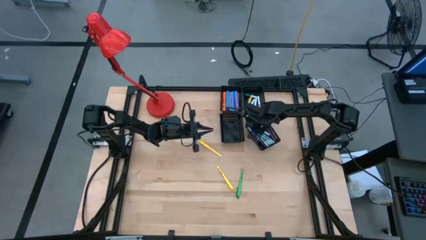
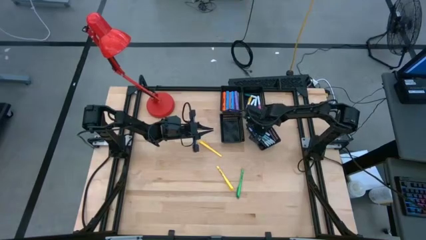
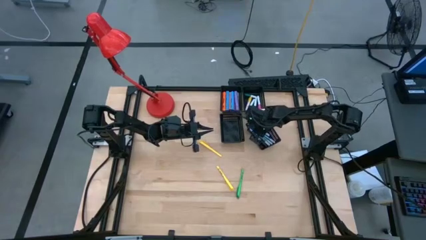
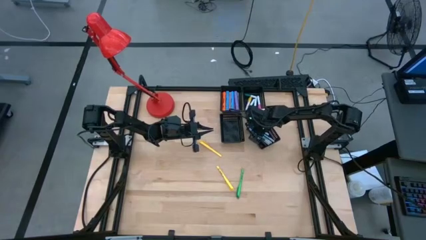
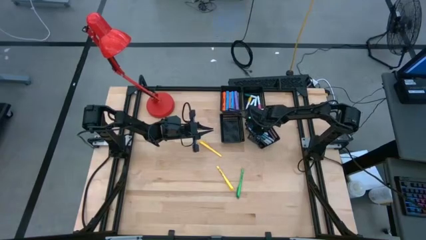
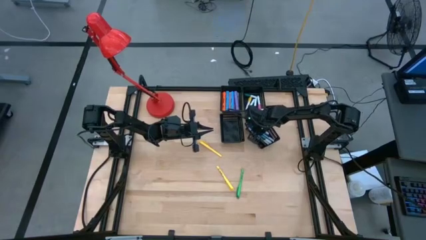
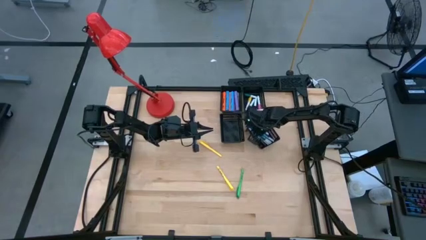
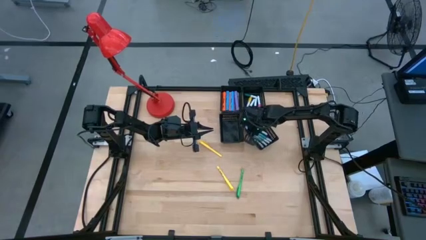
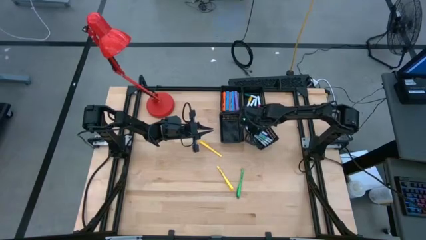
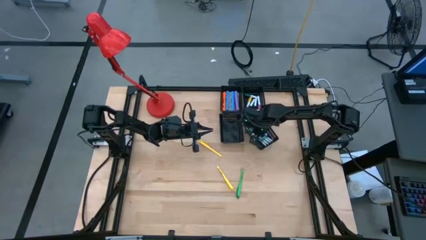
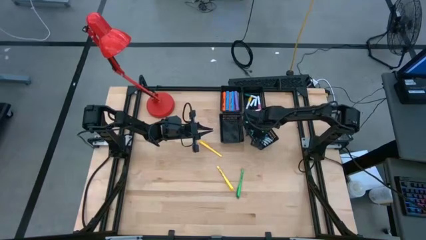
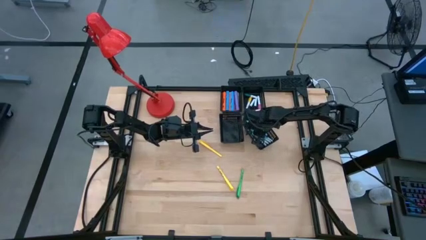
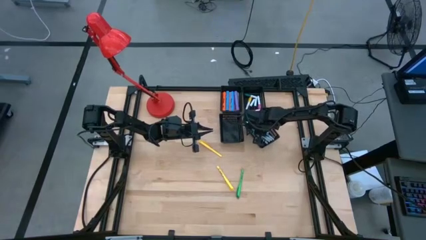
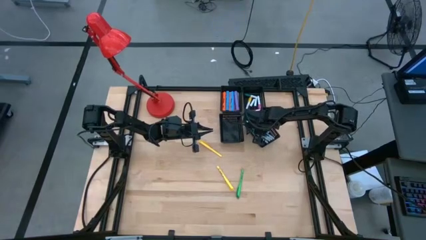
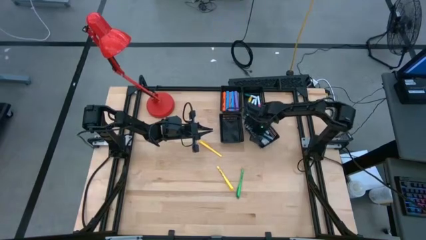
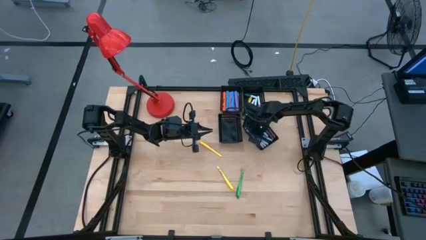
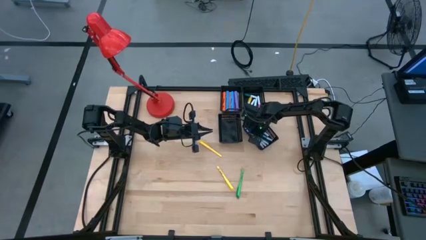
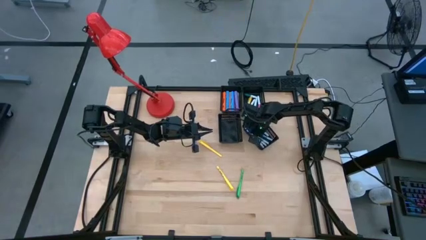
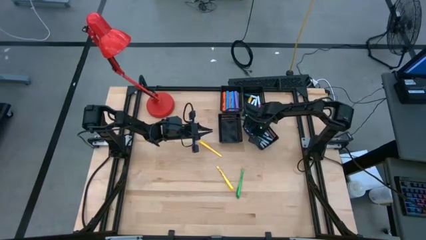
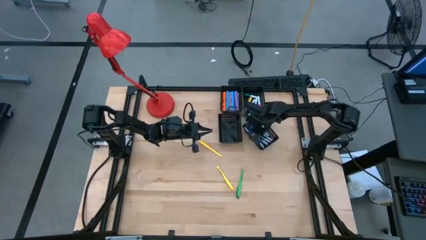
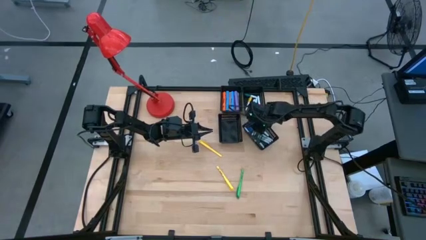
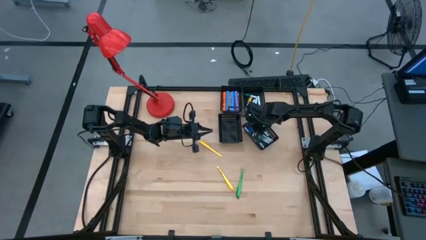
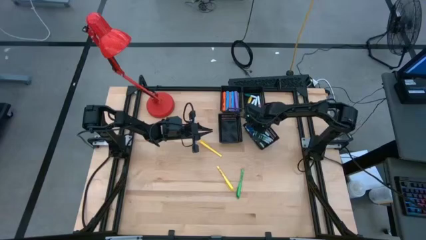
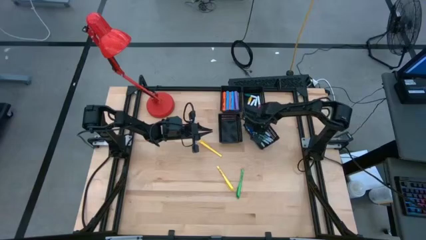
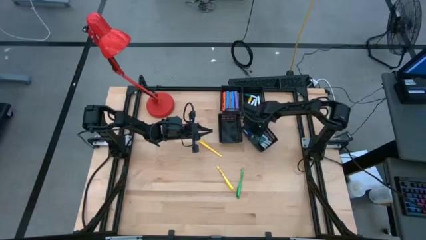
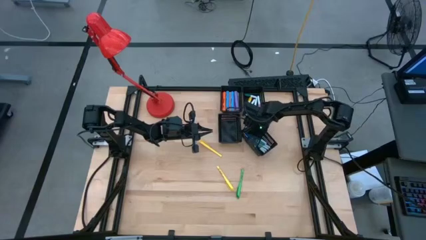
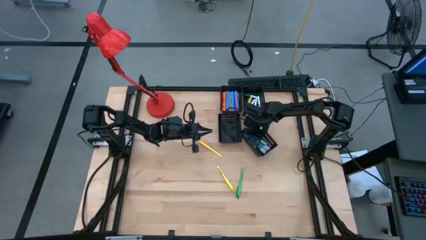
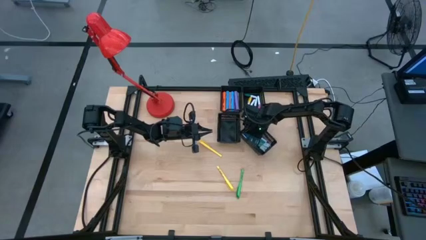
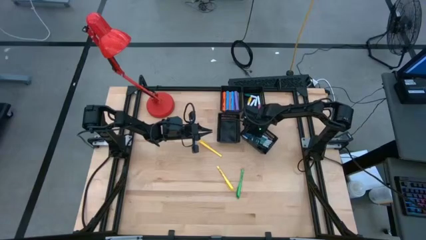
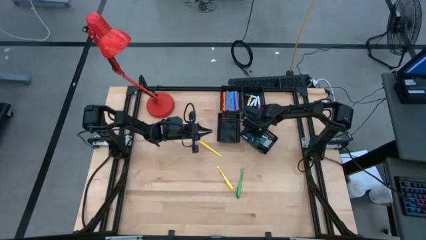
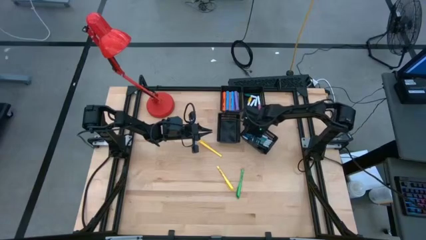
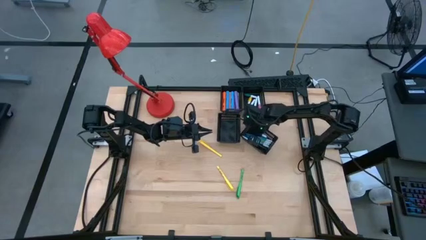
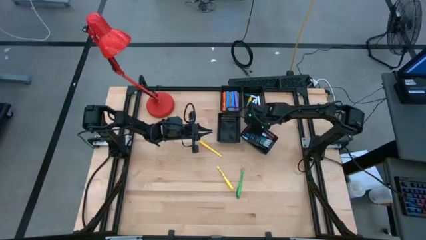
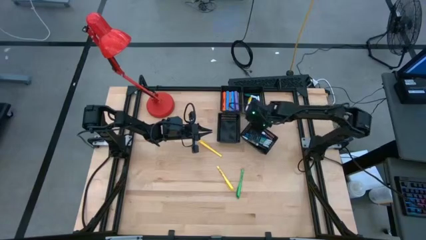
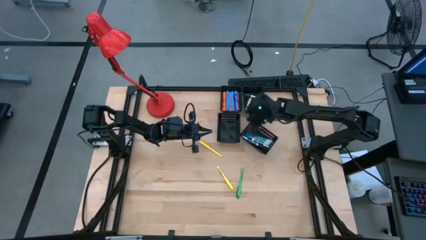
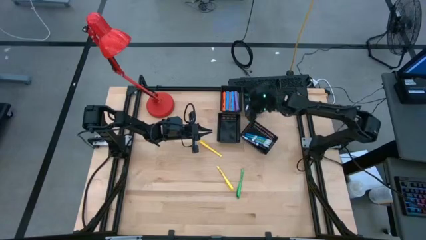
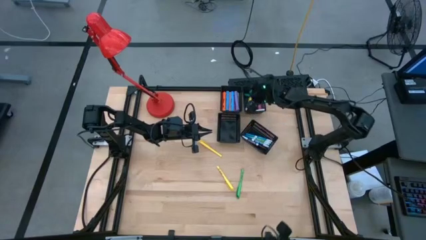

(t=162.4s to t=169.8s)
Task: Pick & Place Markers
Put the green highlighter pen into the top right black bin

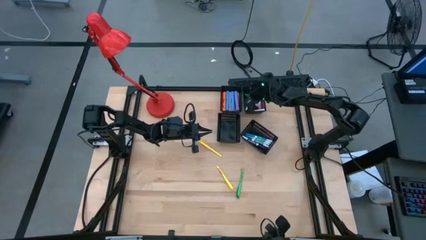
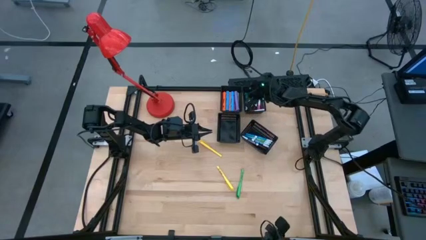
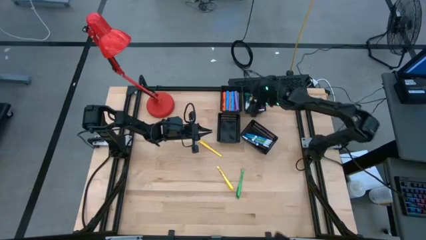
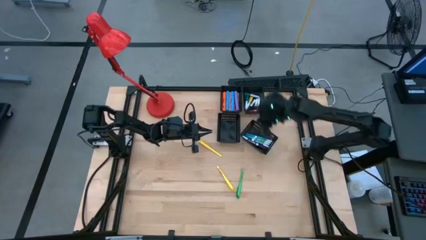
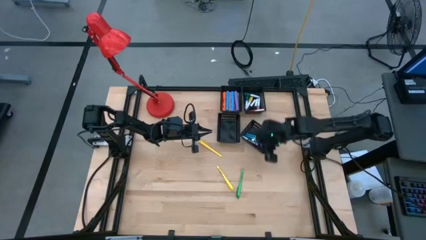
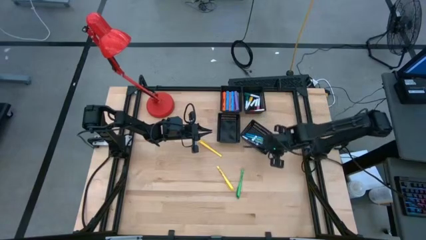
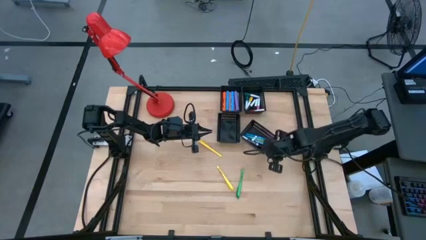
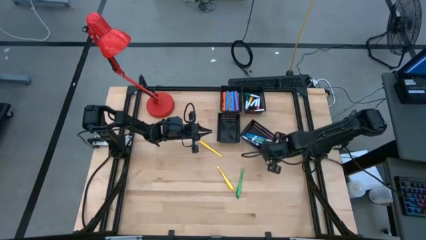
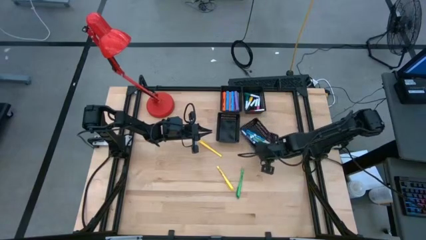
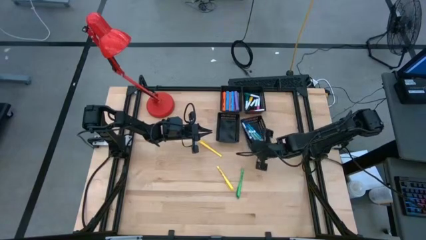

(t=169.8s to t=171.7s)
Adjust the bottom right bin

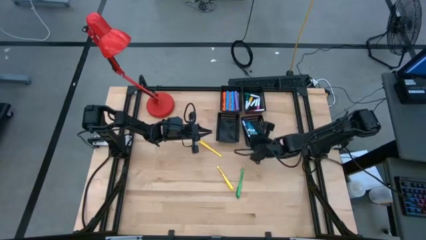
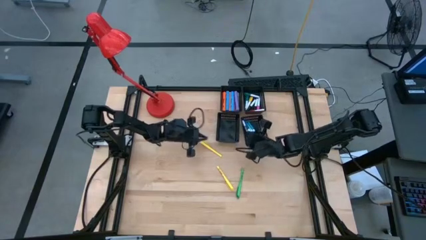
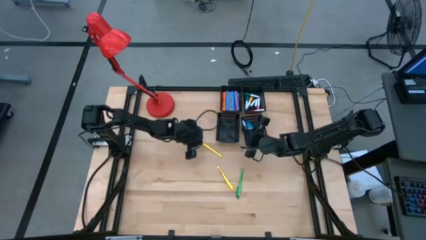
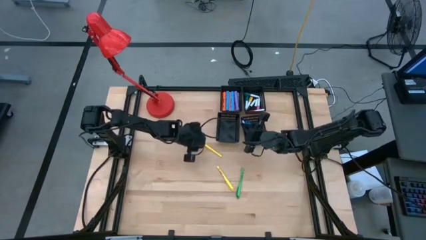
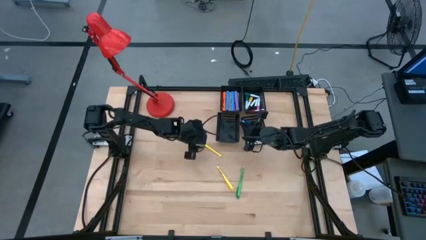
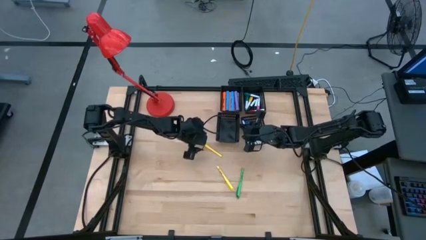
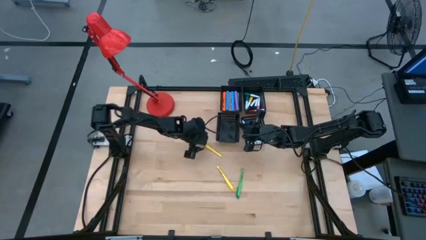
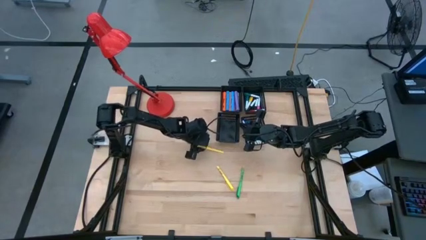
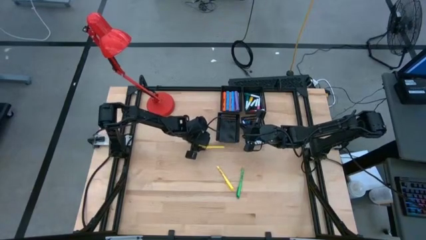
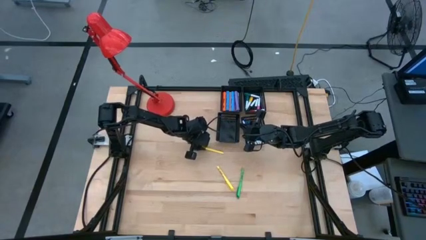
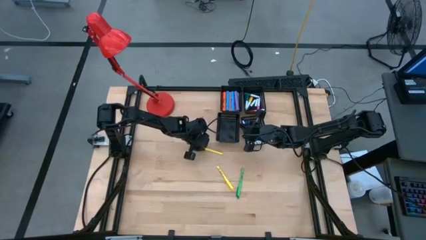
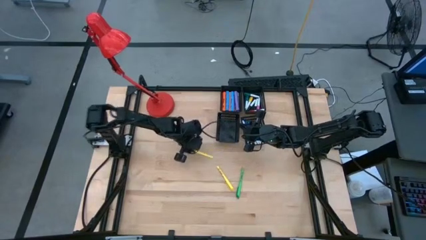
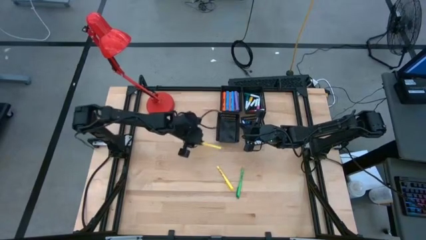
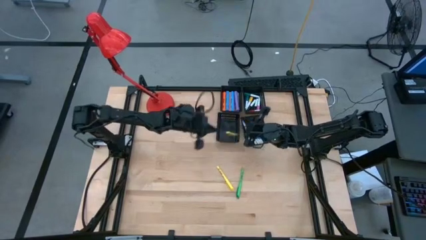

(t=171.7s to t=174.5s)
Put the yellow pen into the bottom left black bin

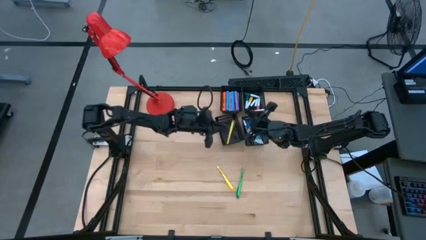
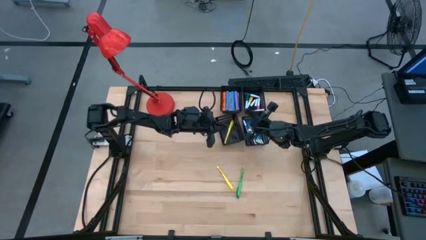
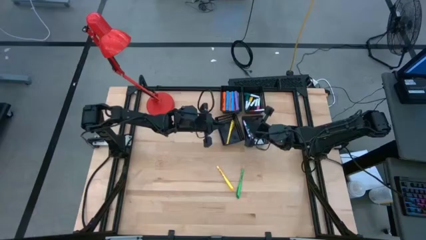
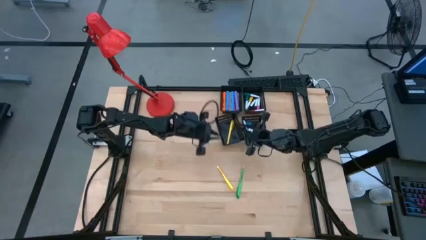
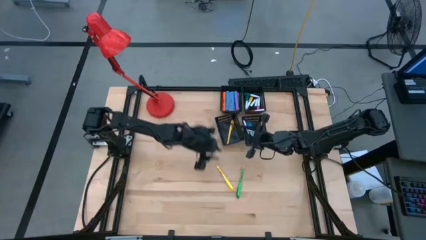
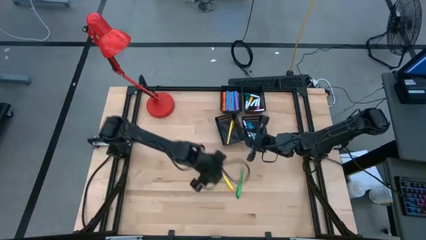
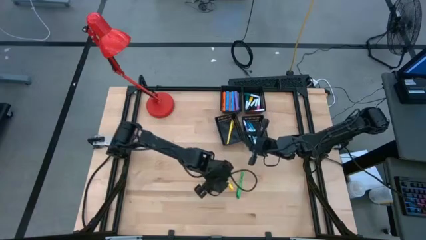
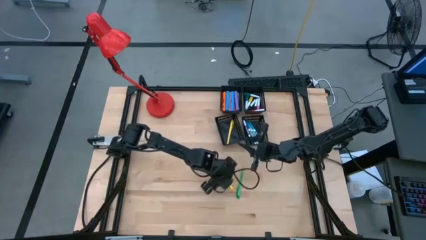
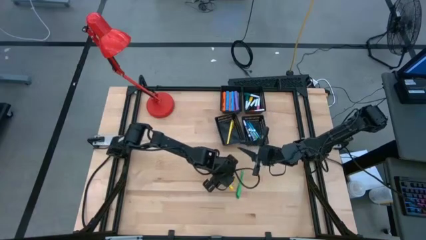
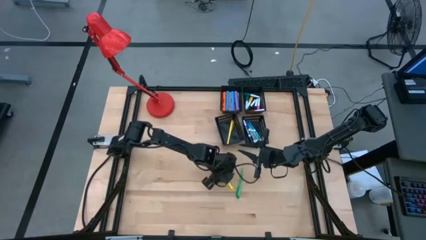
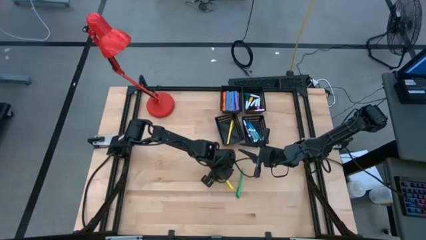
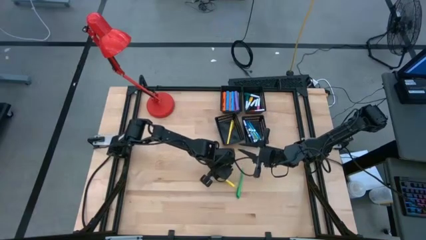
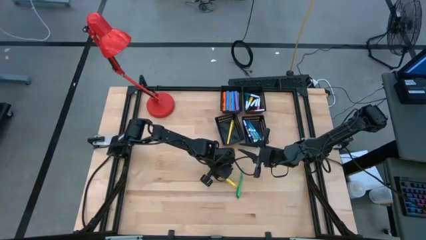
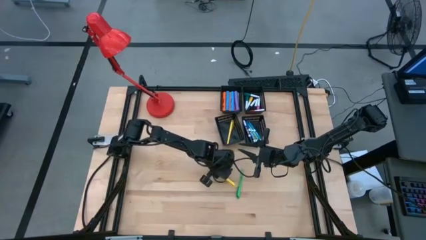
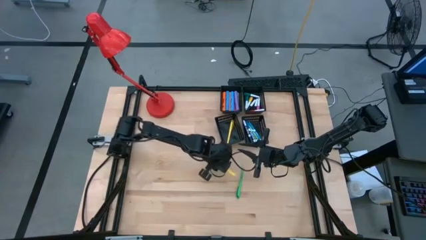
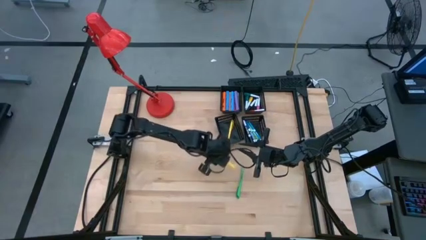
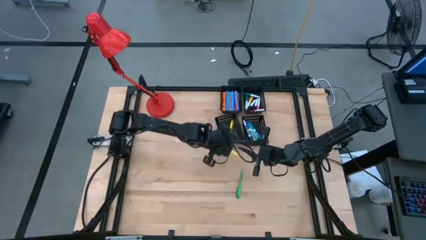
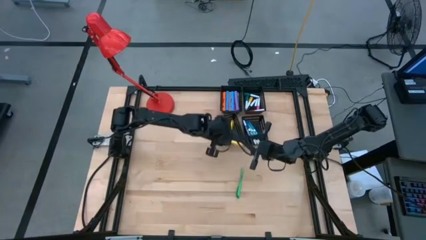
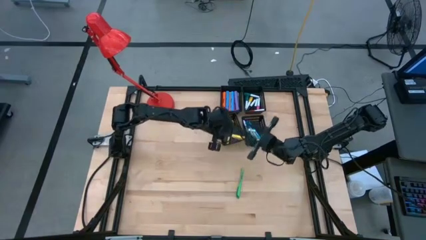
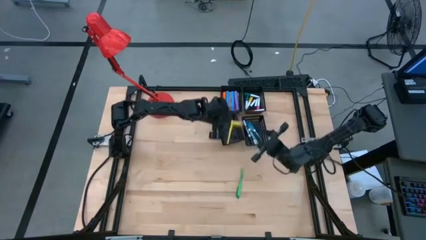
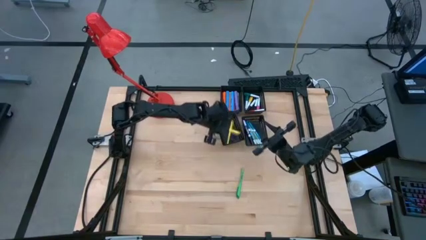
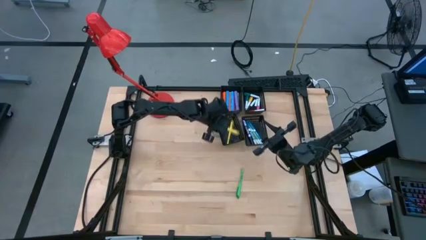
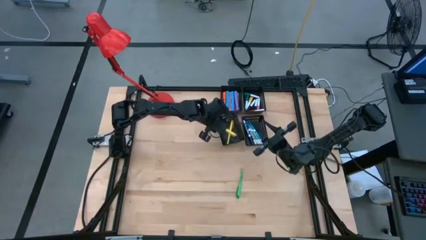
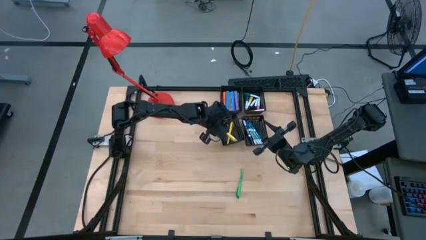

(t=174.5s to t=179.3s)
Put the yellow pen into the bottom left black bin

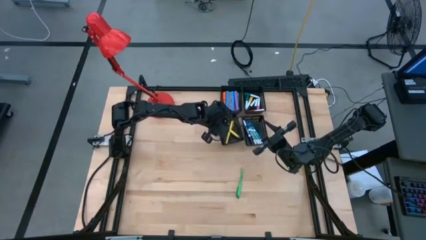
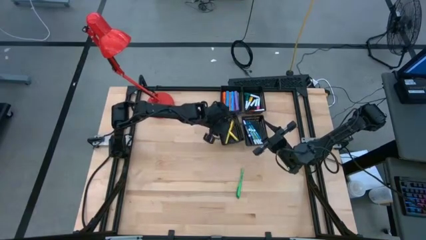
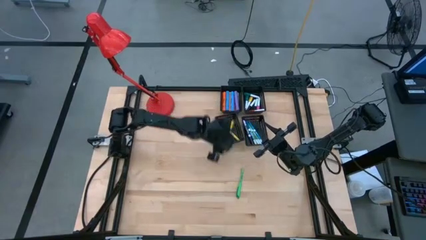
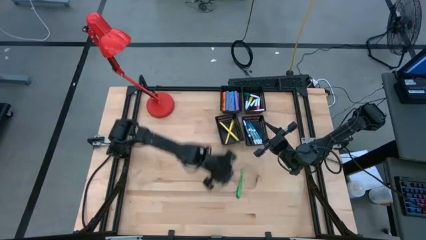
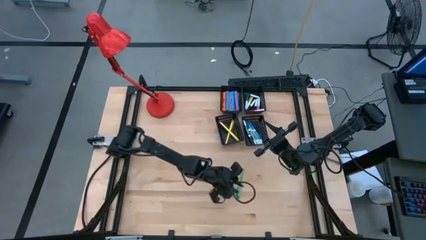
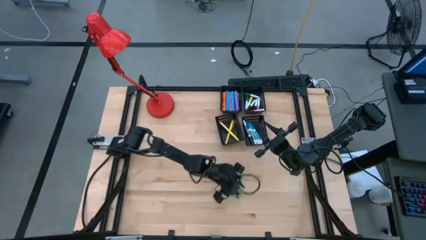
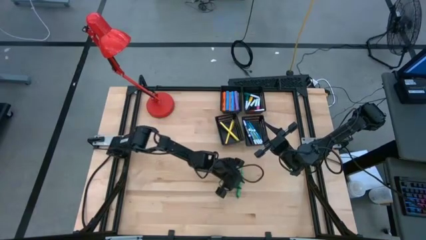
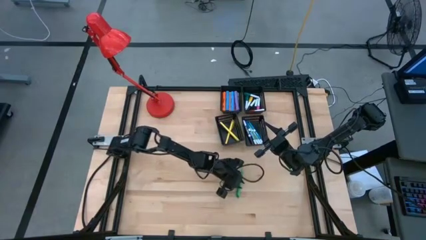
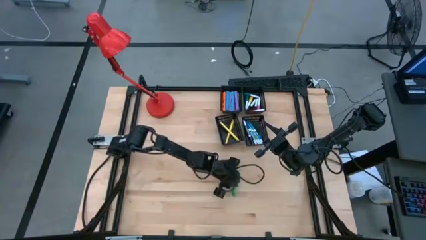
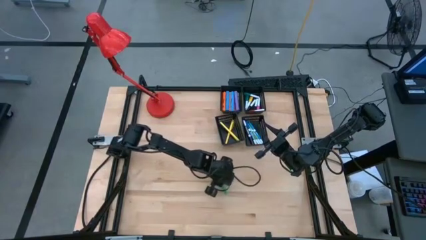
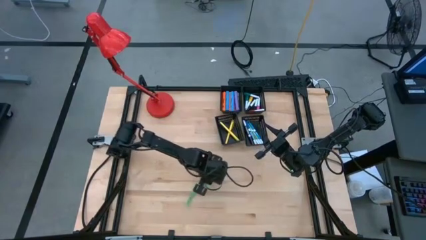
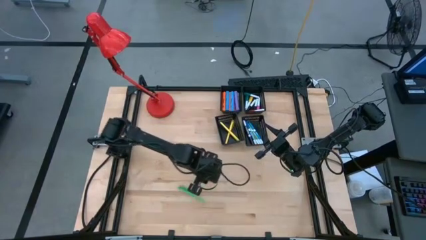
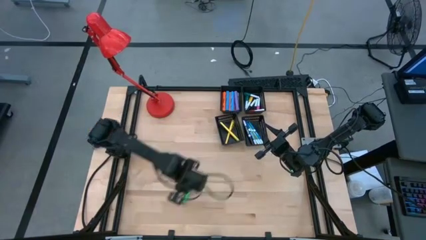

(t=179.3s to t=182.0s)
Put the green pen into the bottom left black bin
